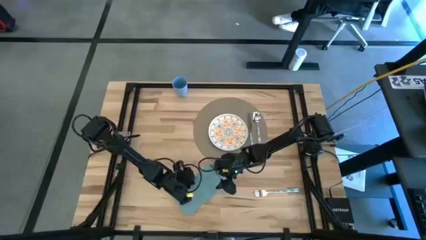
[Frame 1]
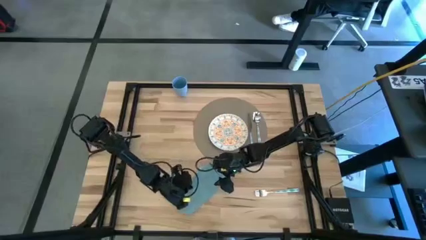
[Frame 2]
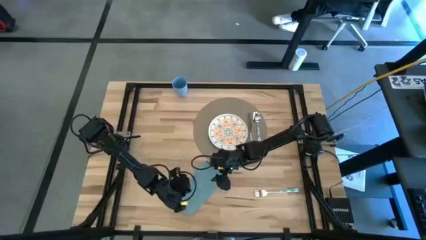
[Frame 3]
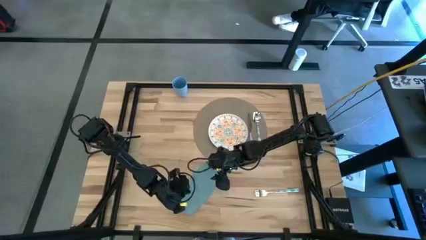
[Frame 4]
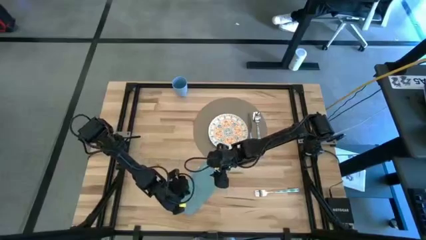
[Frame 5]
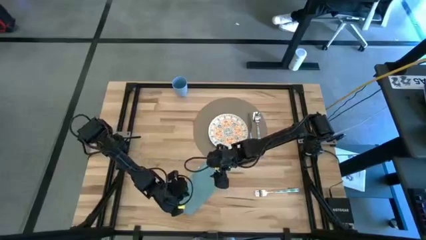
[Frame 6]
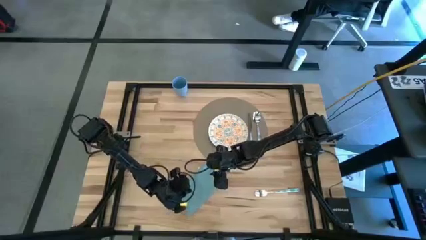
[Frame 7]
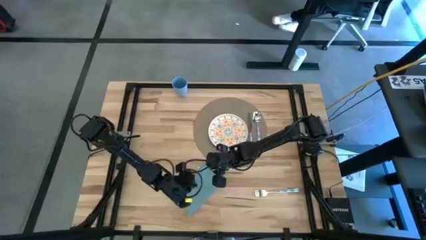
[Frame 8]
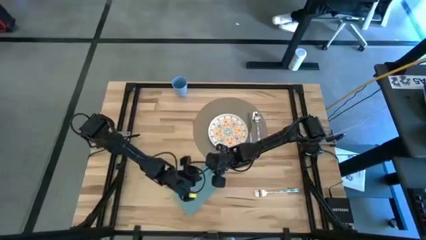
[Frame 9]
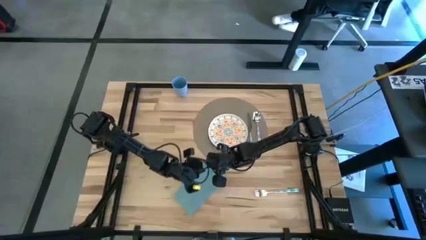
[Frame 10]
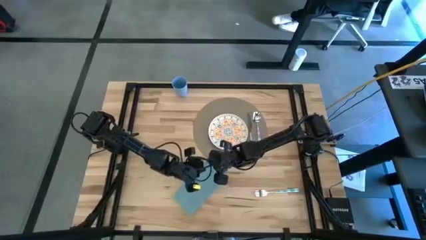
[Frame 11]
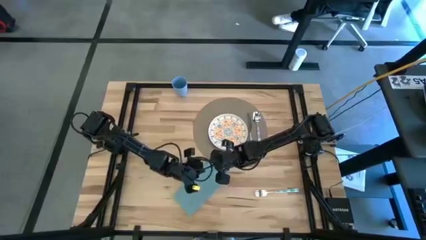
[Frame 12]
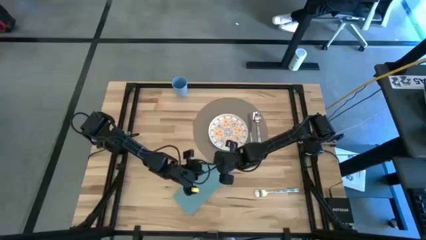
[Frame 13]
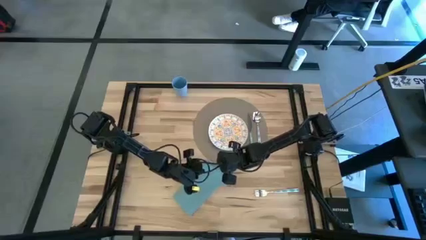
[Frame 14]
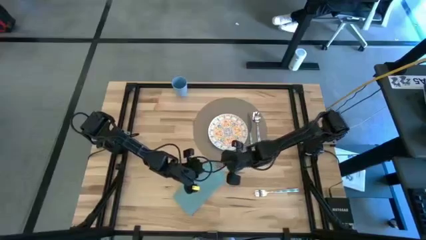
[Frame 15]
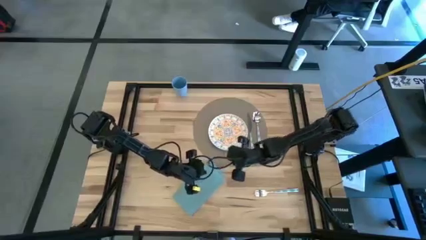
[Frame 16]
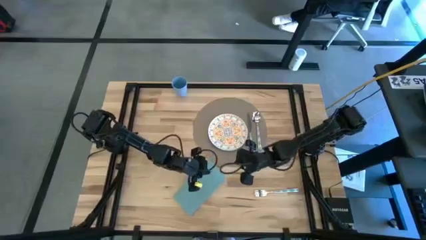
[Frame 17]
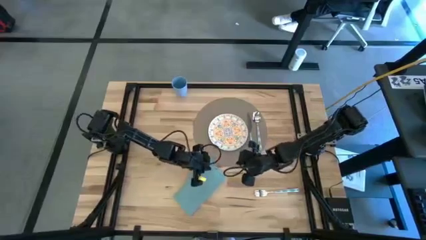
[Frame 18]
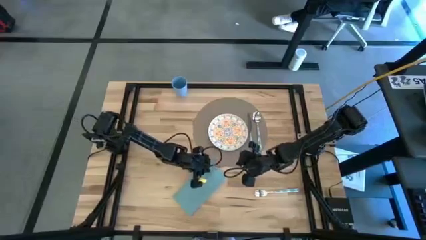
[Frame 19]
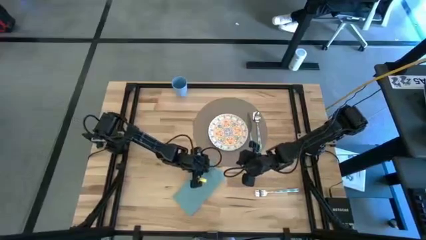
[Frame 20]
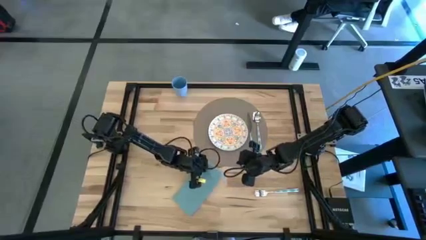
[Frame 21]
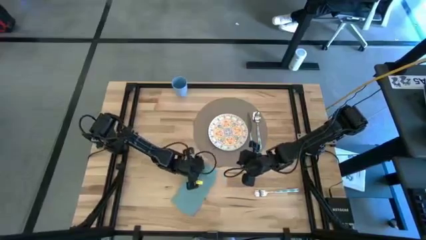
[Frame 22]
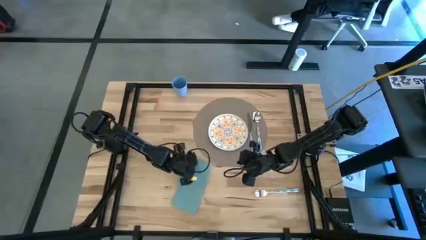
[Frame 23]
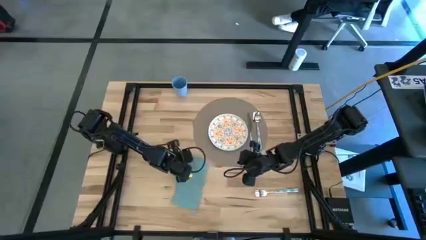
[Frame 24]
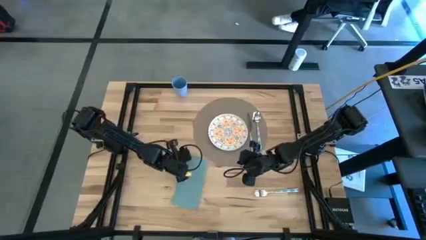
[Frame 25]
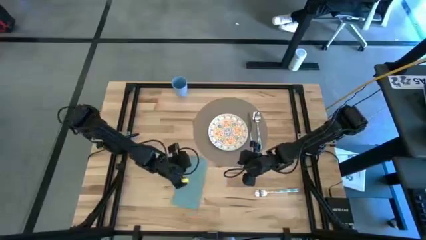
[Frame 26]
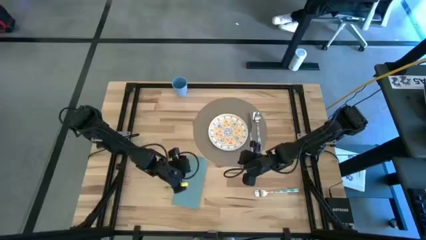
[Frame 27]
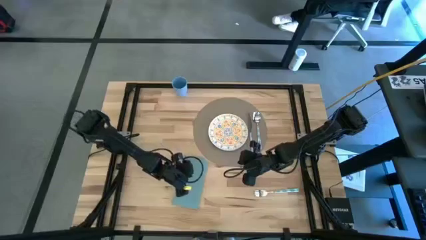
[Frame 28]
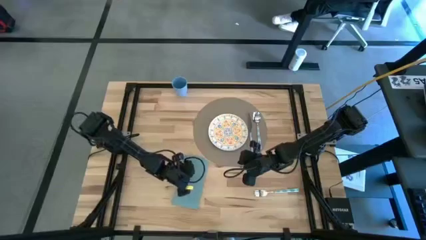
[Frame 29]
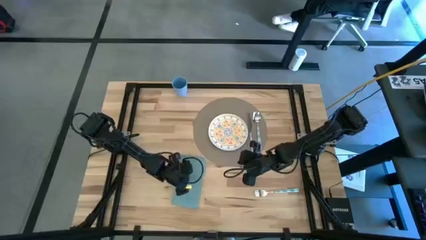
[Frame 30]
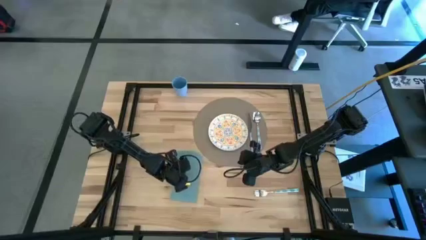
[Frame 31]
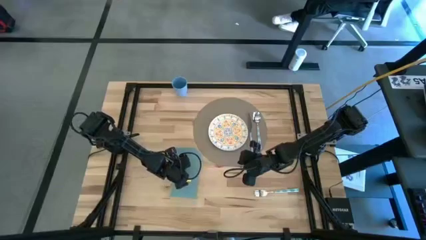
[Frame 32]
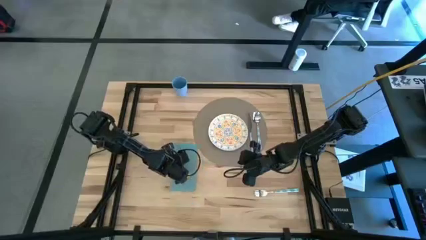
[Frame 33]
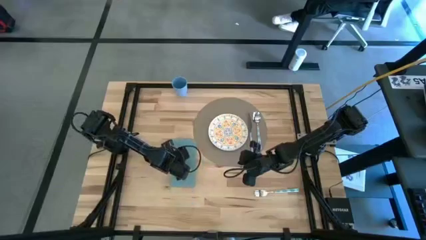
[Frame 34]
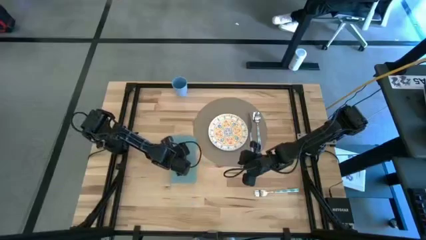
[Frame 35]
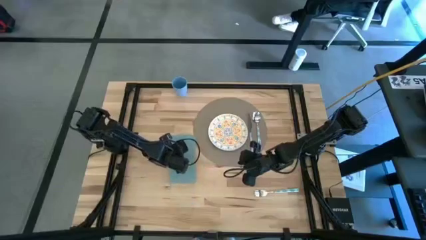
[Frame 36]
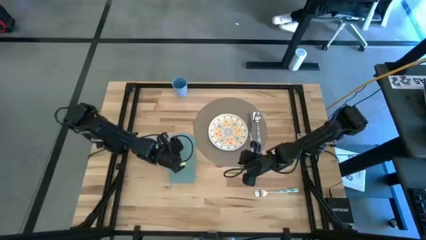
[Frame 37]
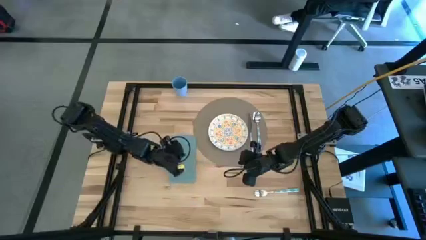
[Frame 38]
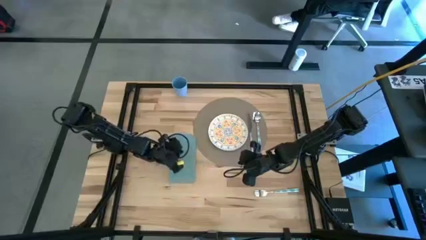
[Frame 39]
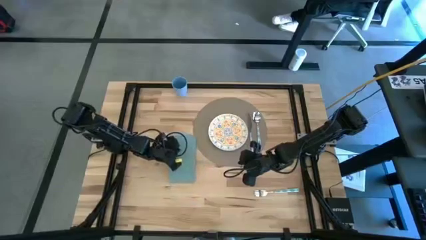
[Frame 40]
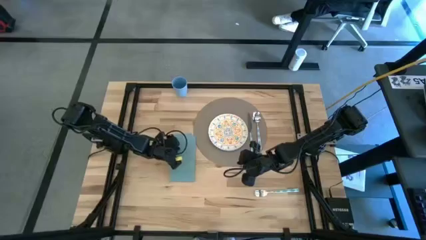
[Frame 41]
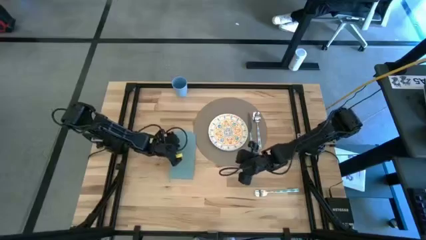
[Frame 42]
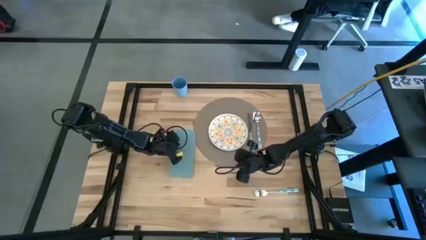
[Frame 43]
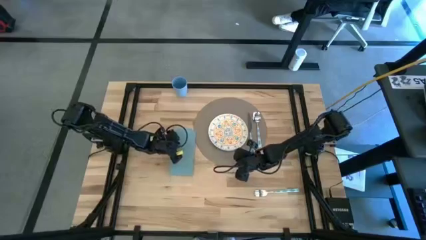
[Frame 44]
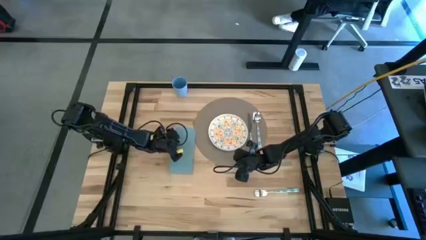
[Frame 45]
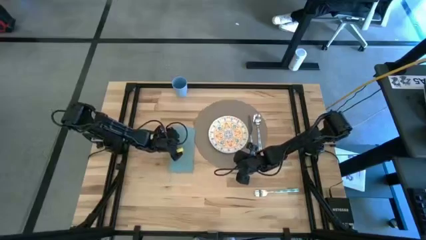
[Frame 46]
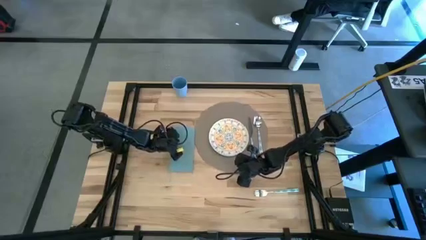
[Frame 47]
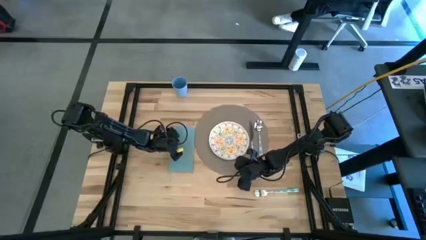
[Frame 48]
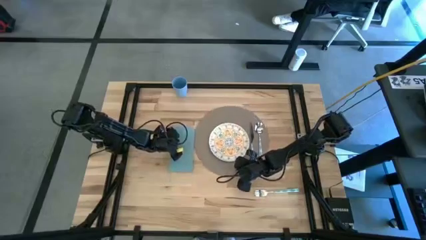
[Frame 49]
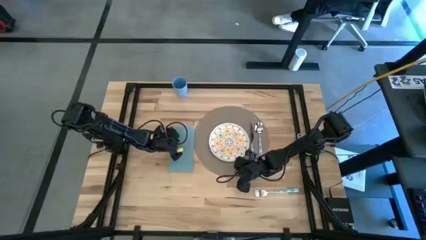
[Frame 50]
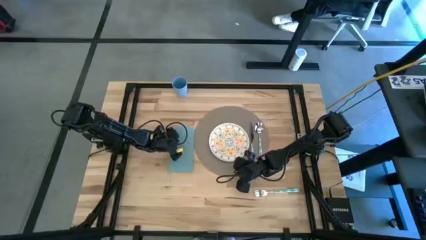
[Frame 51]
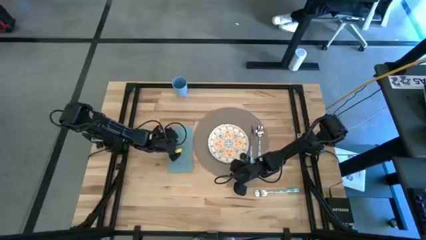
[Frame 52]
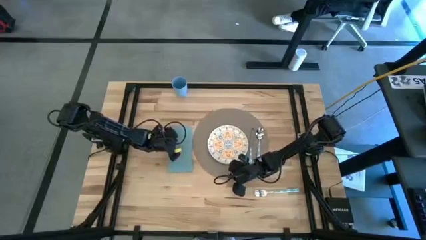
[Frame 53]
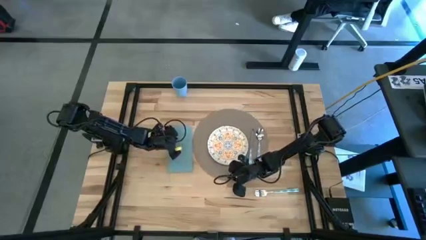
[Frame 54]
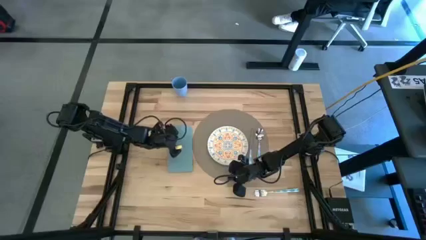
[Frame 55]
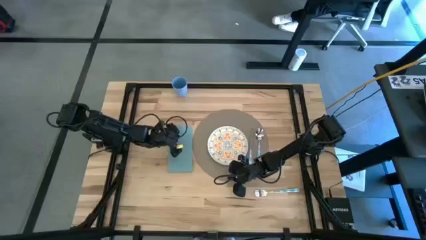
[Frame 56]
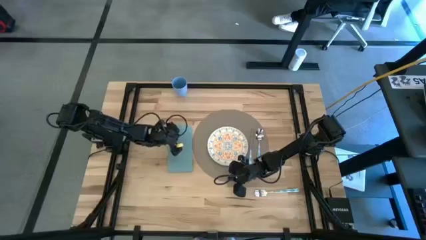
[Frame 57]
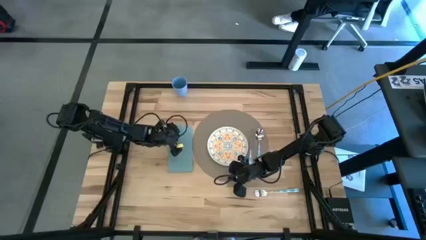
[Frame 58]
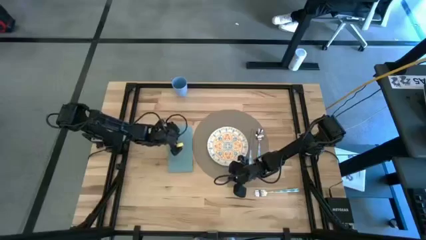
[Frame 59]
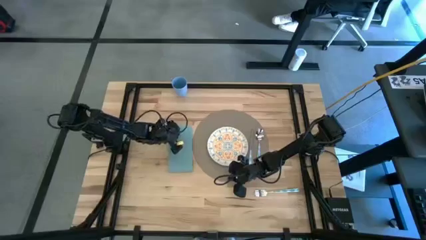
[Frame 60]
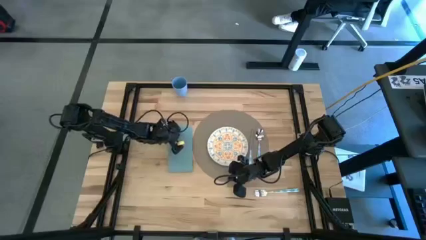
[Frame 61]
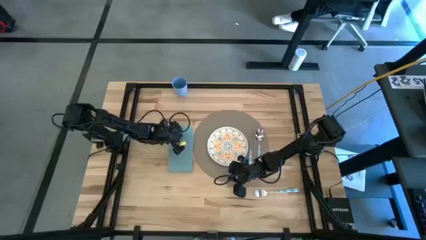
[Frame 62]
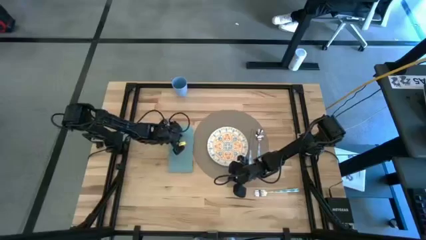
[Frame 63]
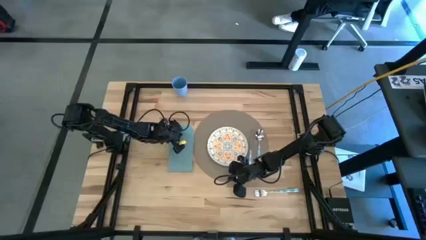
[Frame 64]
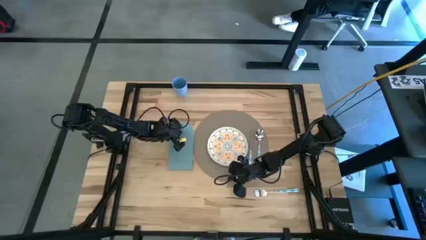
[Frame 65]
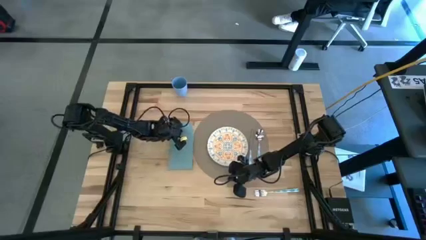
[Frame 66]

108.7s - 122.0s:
Task: Set table place
Move the blue napkin to the top left of the table

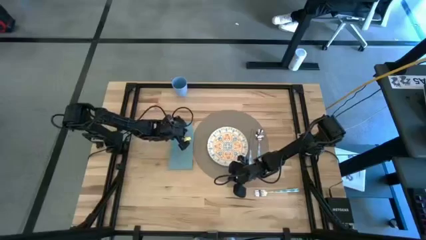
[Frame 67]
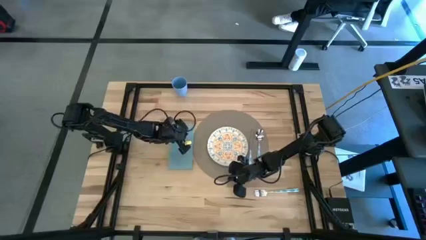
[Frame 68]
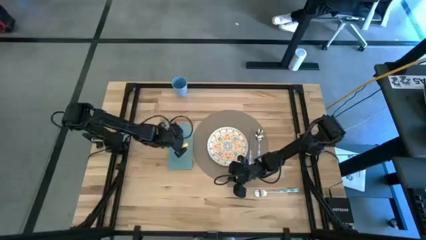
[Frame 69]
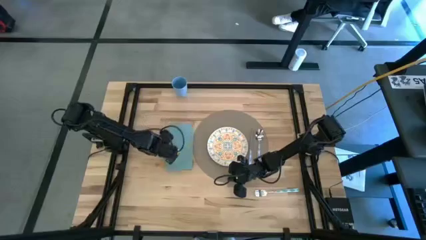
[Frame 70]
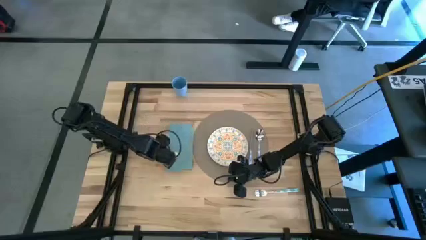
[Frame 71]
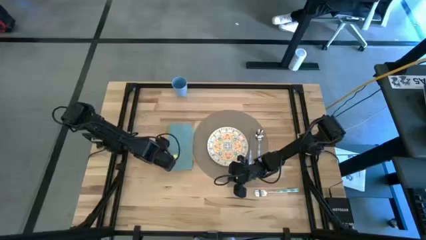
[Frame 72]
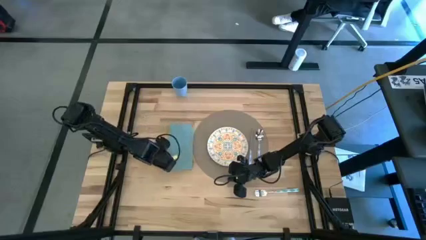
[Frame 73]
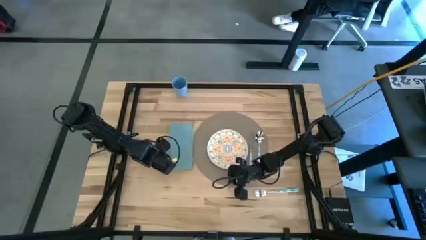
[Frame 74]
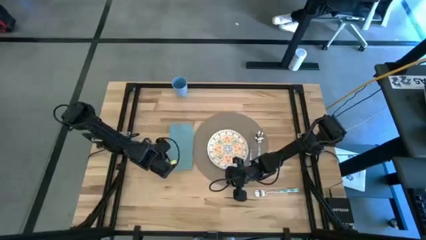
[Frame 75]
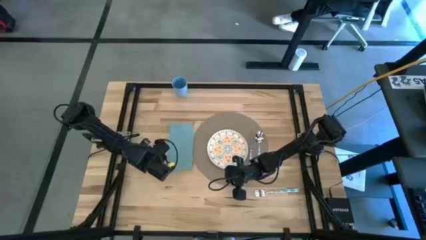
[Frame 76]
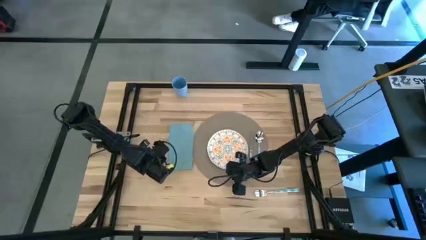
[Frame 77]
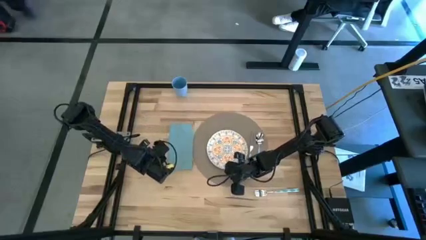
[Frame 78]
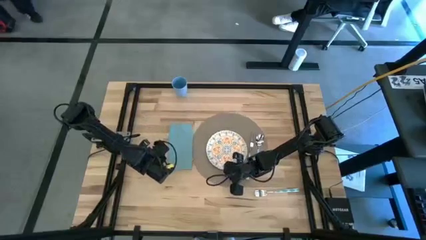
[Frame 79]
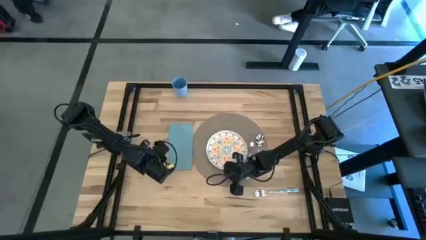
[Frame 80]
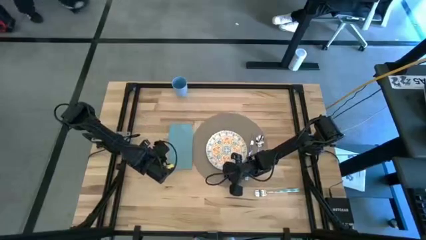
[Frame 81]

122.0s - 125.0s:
Adjust the brown mat
